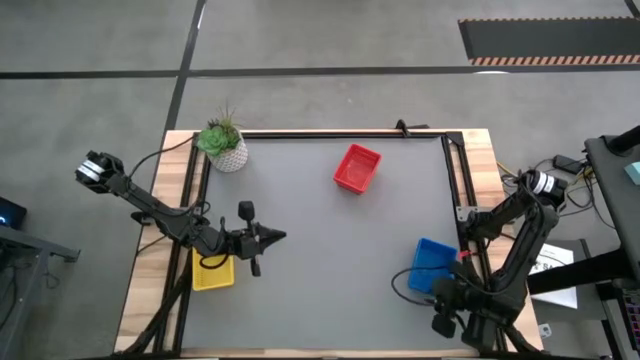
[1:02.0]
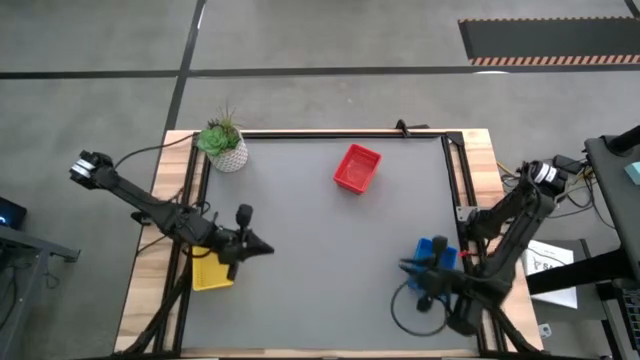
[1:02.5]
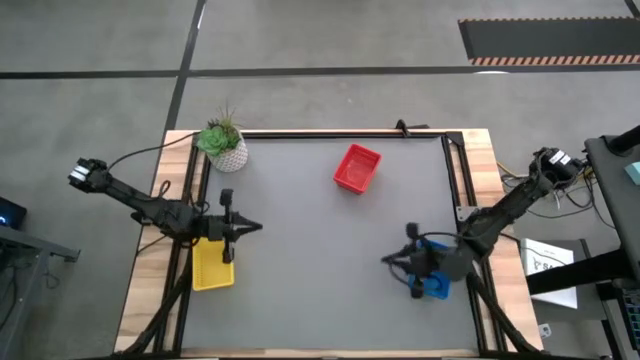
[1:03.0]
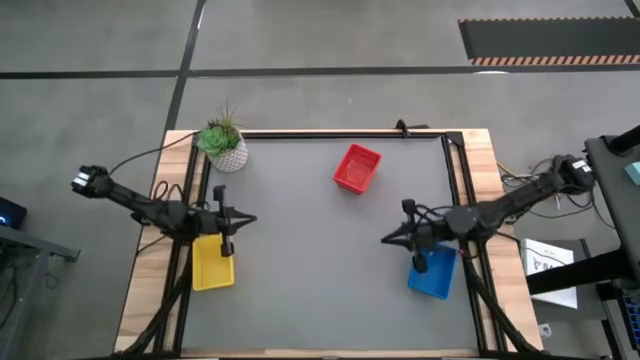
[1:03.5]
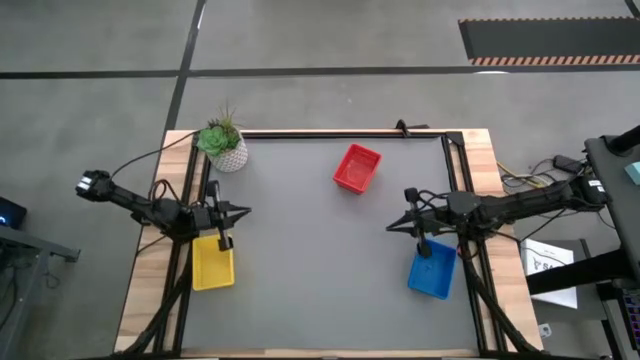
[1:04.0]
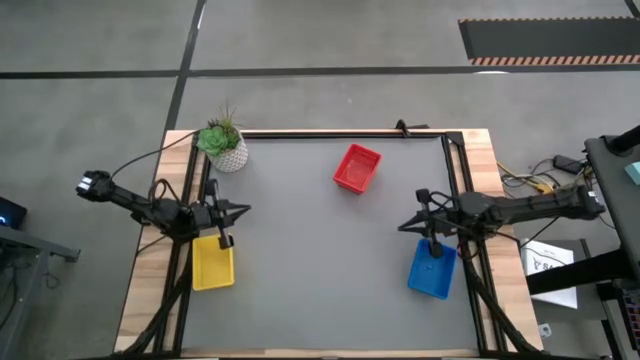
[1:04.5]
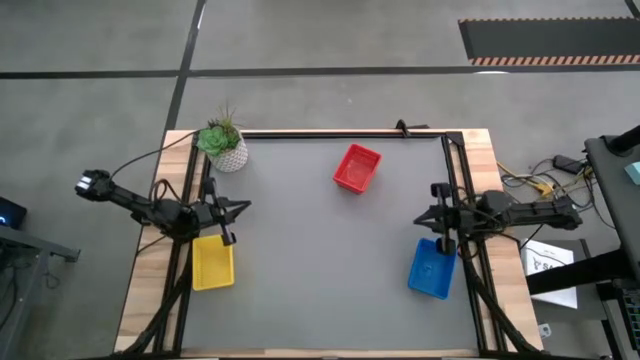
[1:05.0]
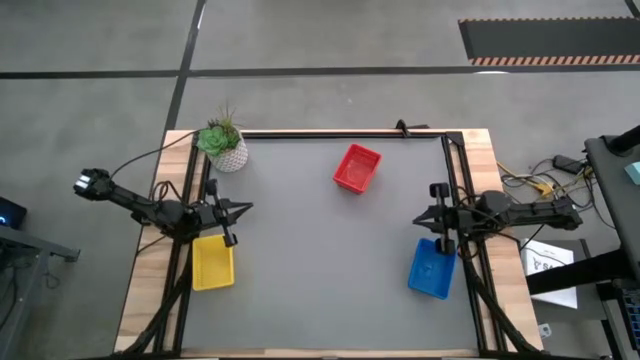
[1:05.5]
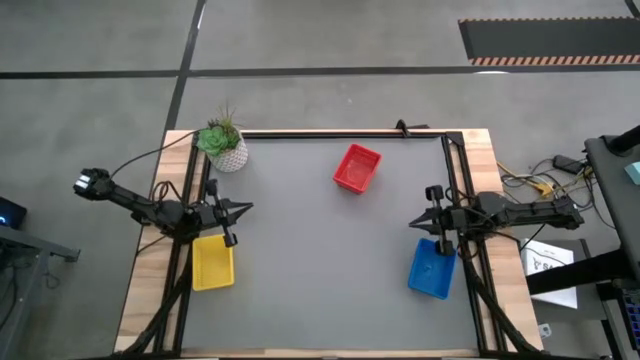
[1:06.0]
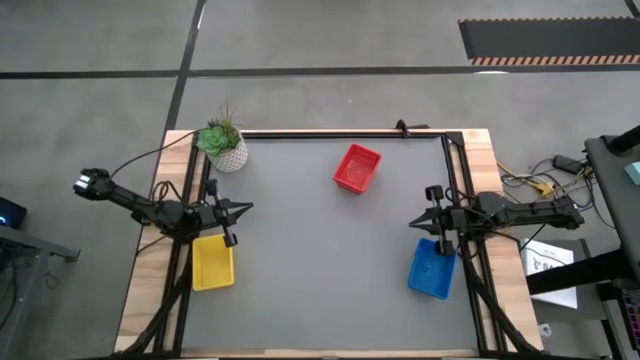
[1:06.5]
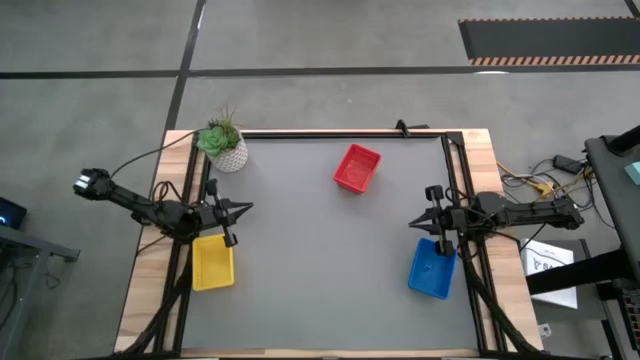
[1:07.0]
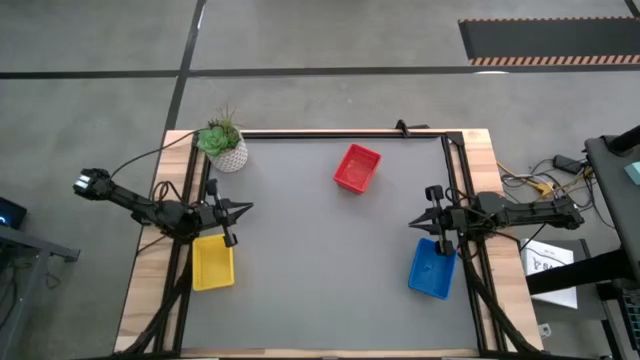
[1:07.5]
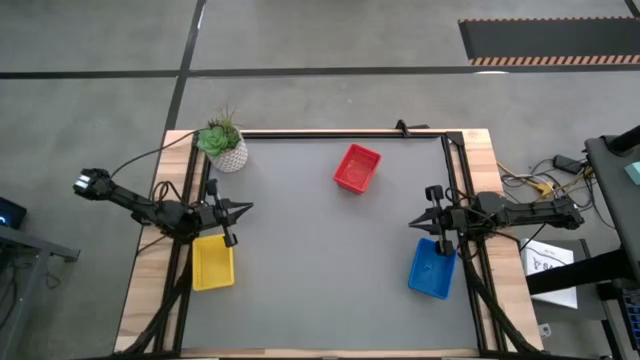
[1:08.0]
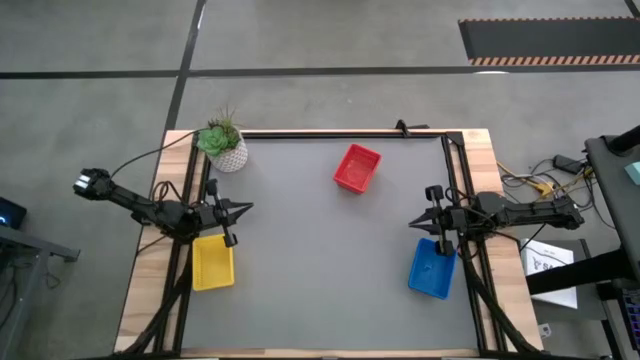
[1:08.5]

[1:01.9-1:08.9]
Return to Home Position
